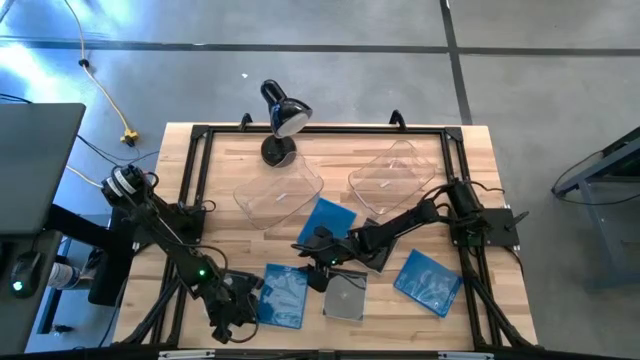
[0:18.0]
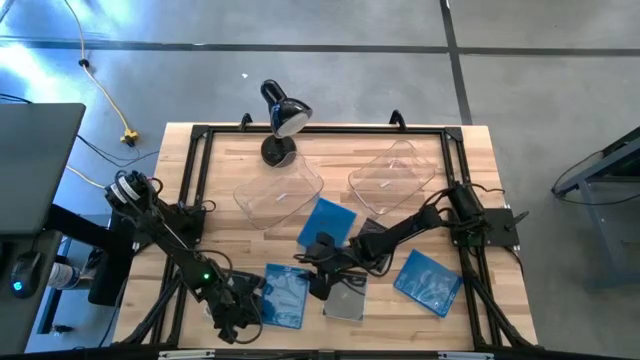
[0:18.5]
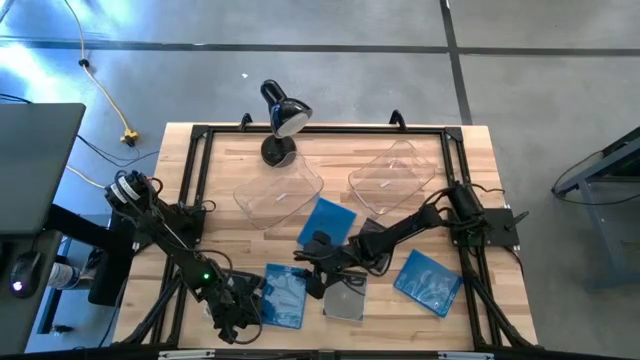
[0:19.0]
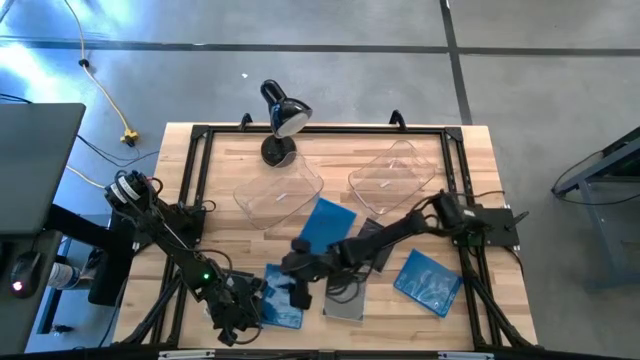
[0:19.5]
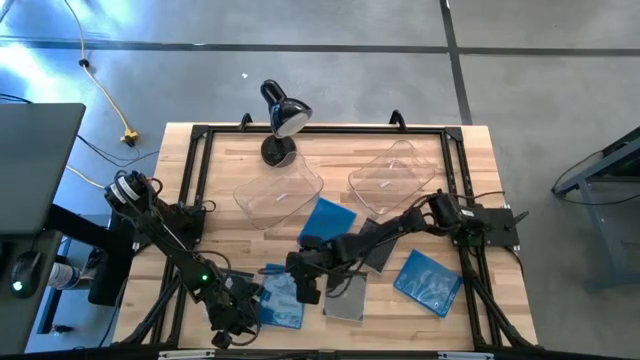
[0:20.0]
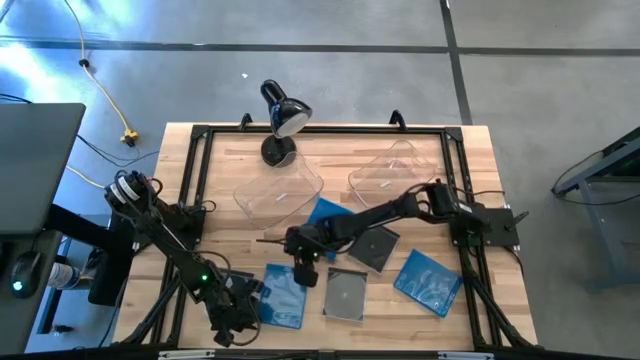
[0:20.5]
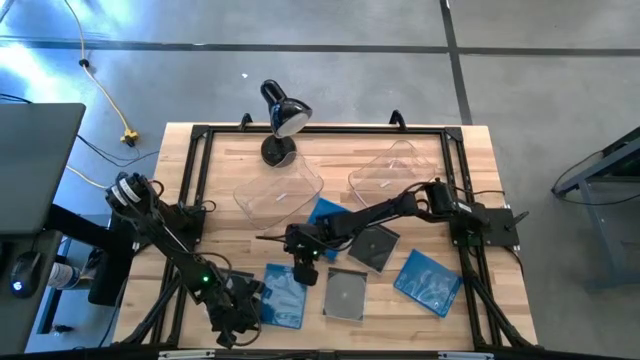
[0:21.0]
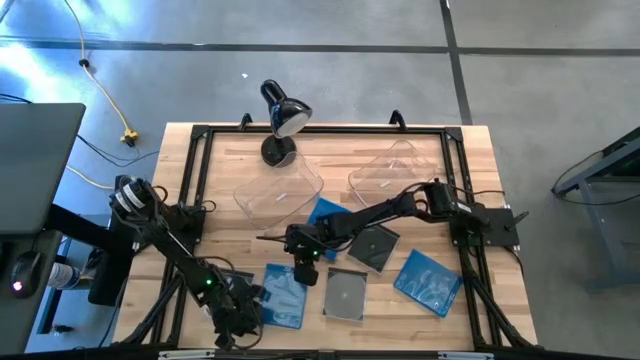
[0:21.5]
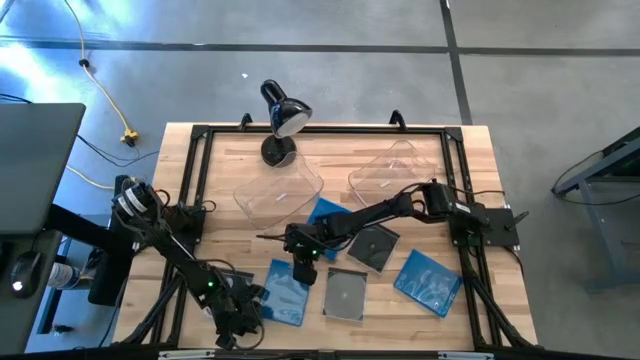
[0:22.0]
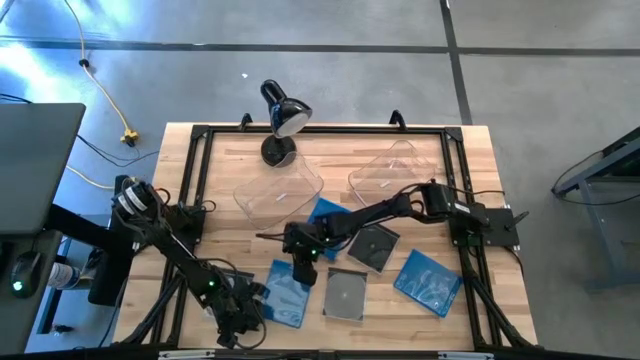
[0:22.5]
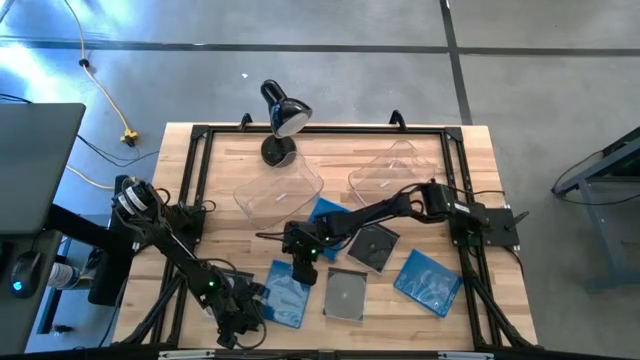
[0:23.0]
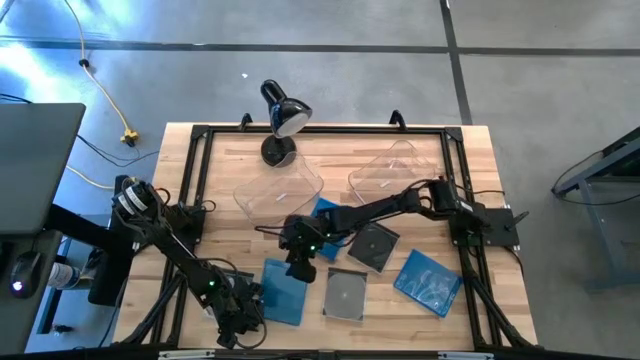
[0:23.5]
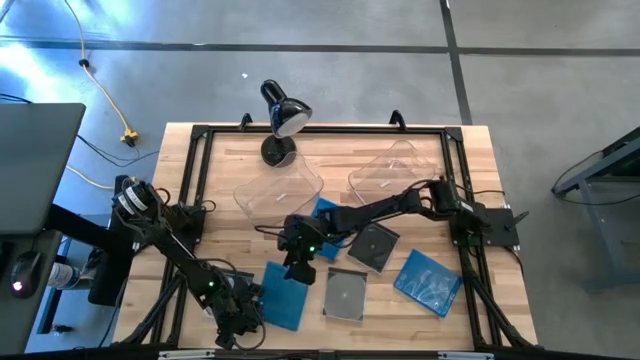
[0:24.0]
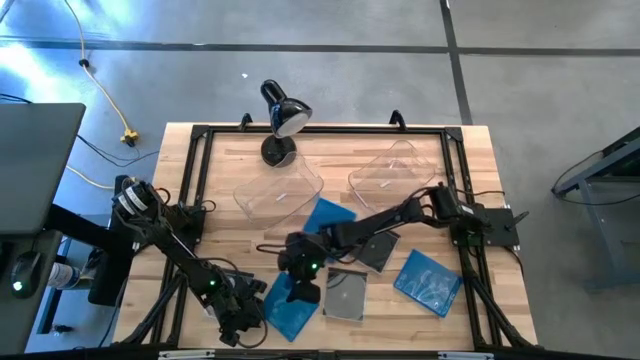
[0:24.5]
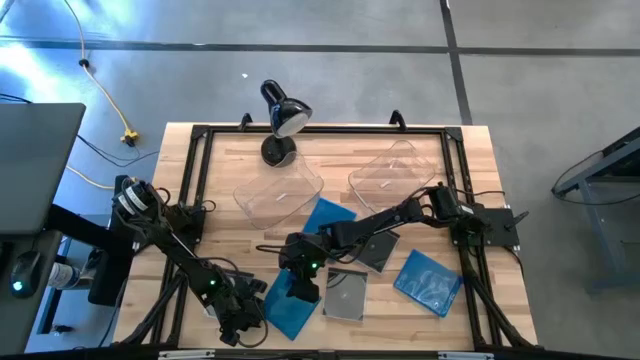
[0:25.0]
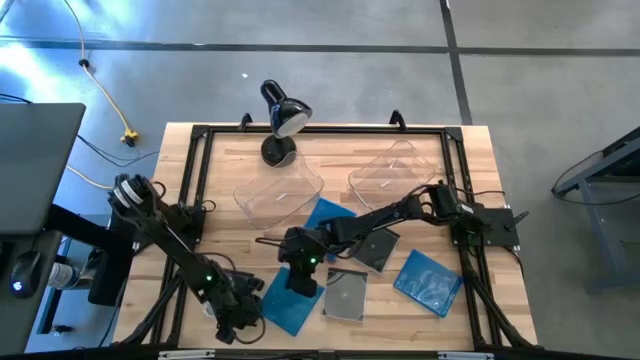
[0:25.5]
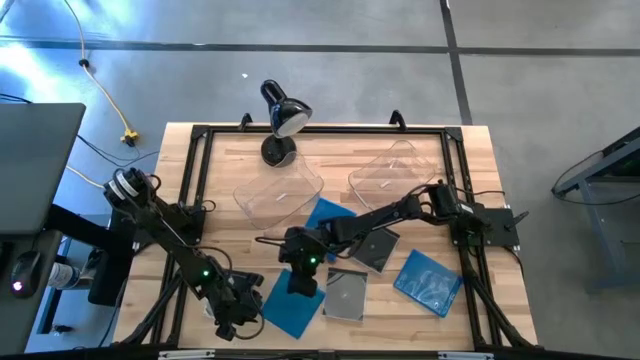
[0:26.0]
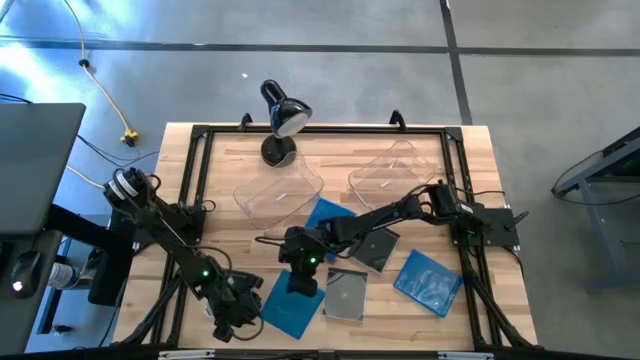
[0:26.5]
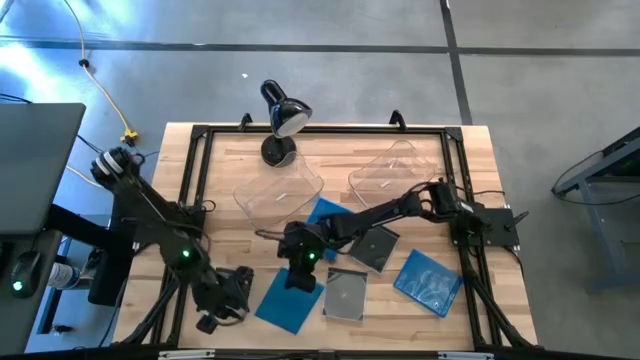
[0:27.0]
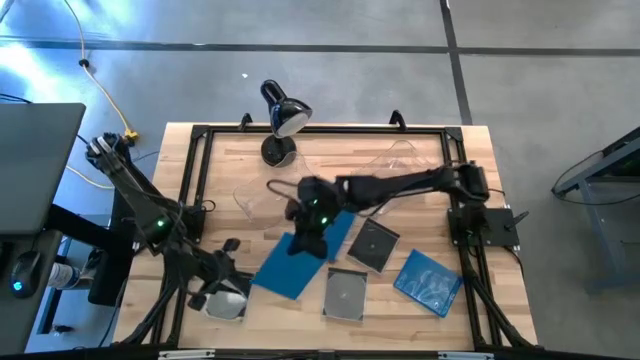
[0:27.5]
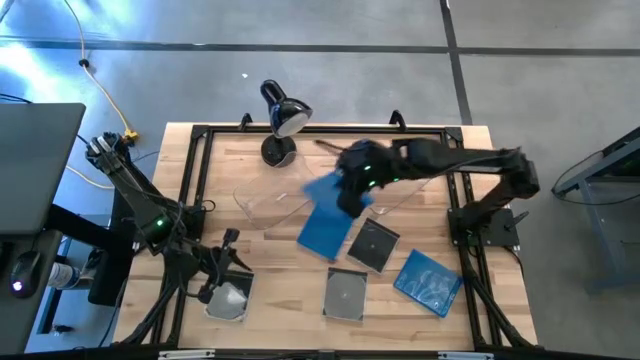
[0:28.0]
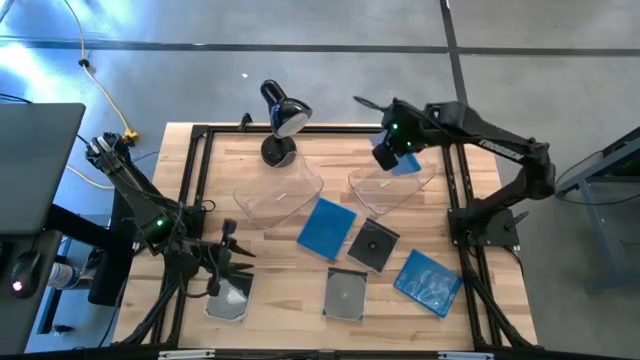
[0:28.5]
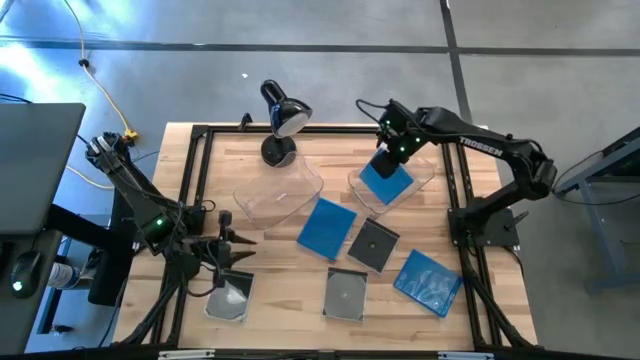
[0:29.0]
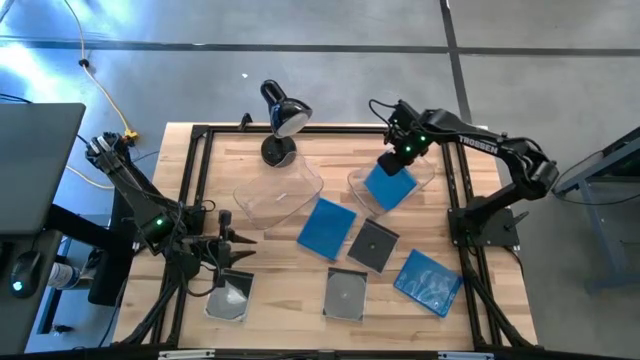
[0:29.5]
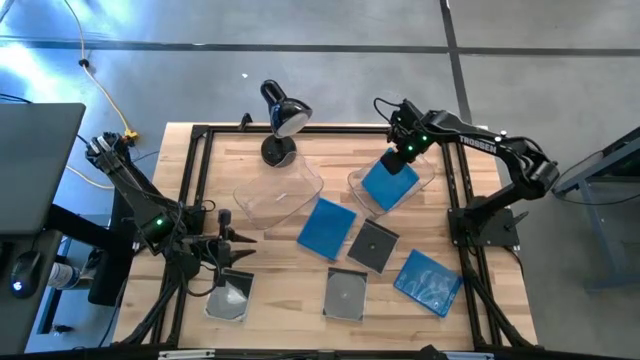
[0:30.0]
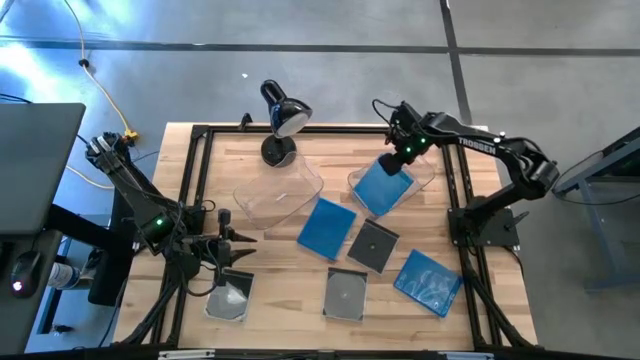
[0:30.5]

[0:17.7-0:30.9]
Task: Pick & place jewel cases by type
Put the bottom left blue CD case into the right transparent bin

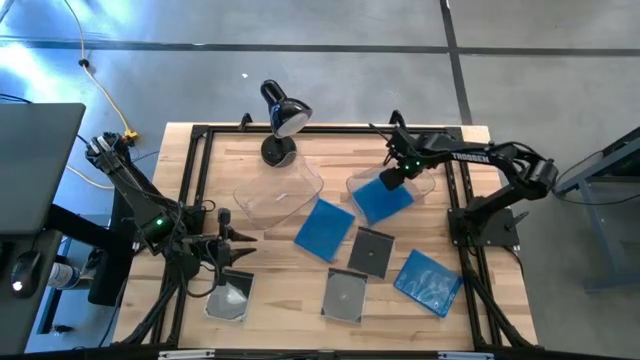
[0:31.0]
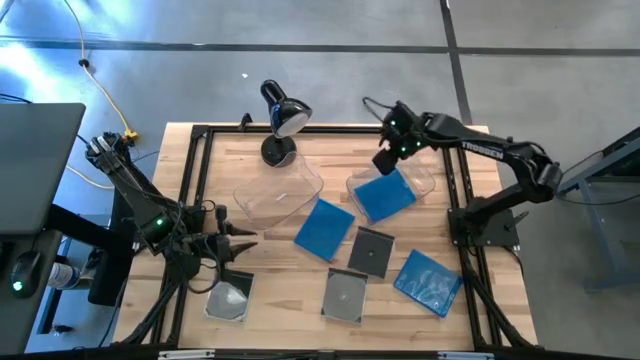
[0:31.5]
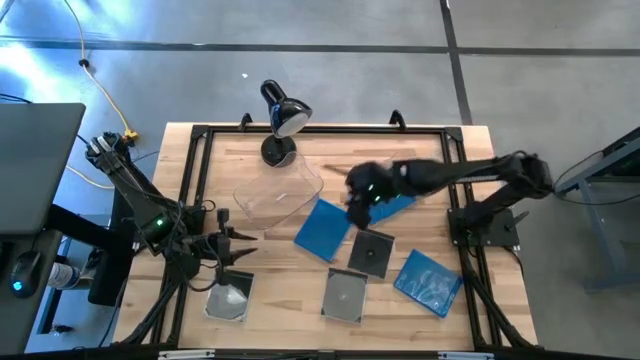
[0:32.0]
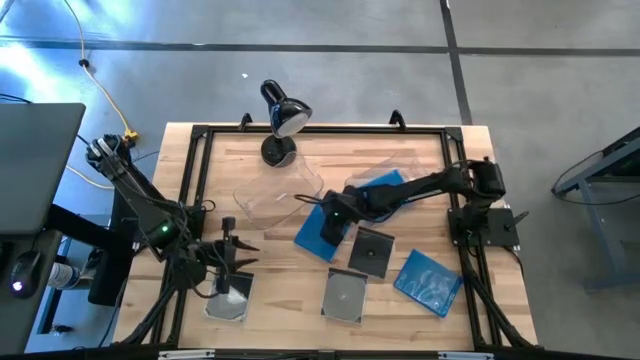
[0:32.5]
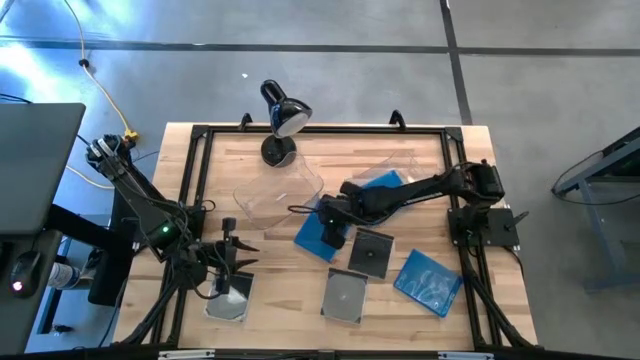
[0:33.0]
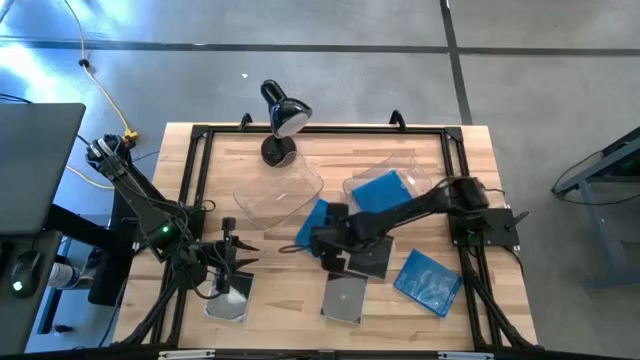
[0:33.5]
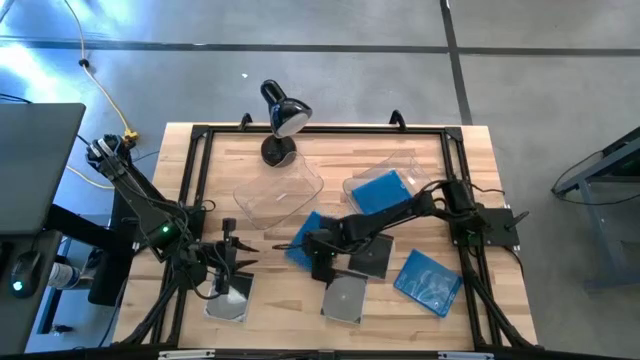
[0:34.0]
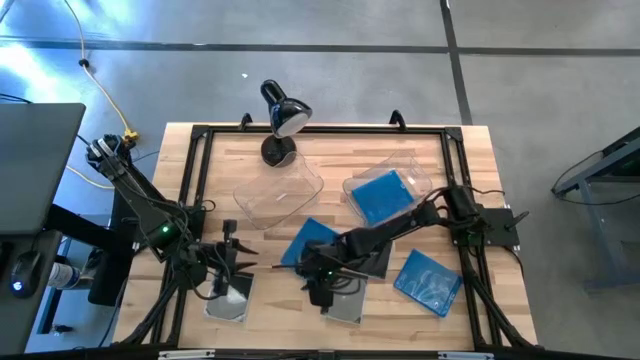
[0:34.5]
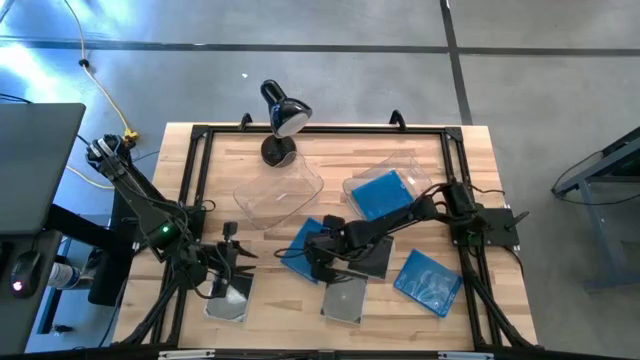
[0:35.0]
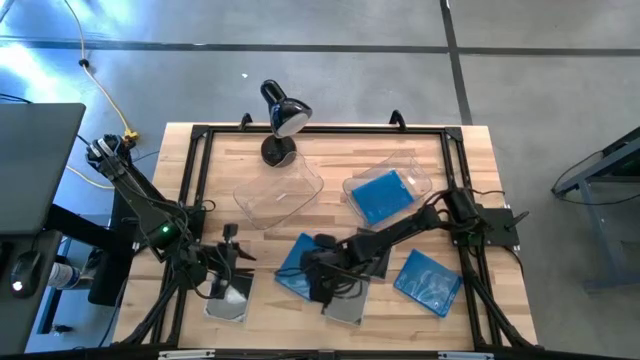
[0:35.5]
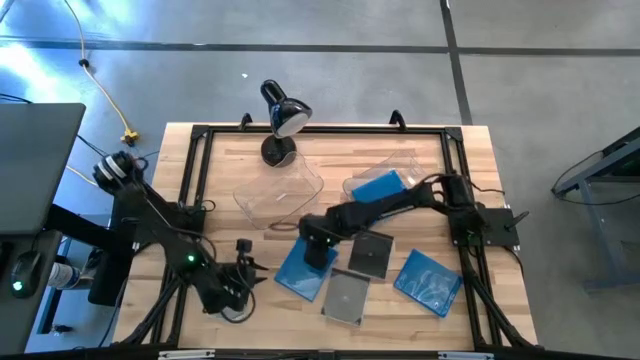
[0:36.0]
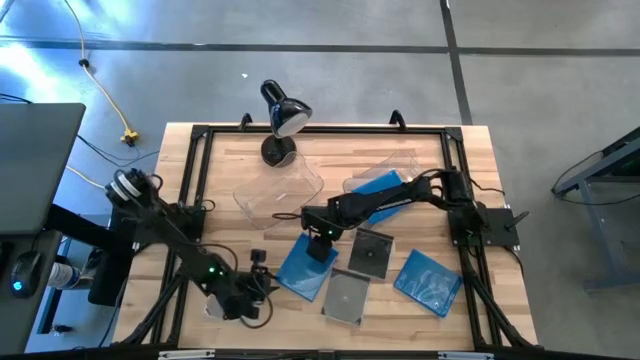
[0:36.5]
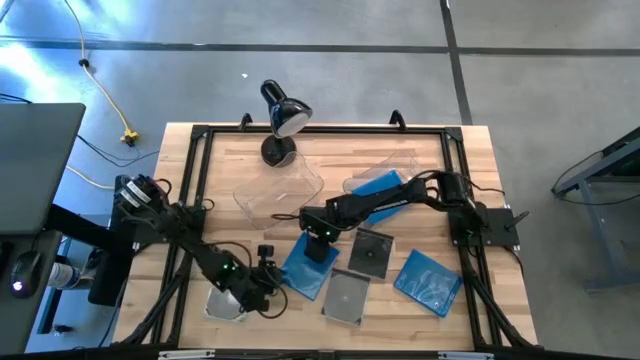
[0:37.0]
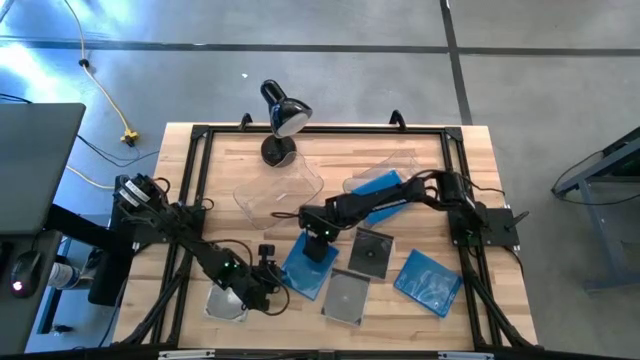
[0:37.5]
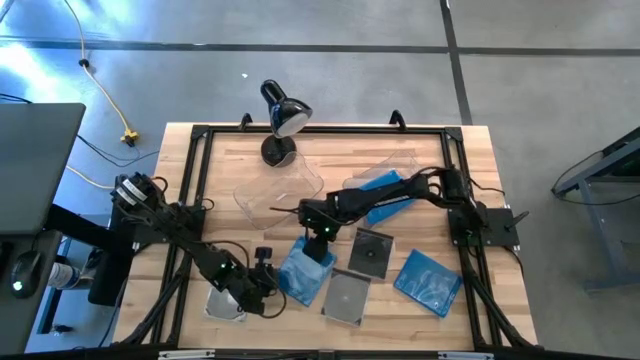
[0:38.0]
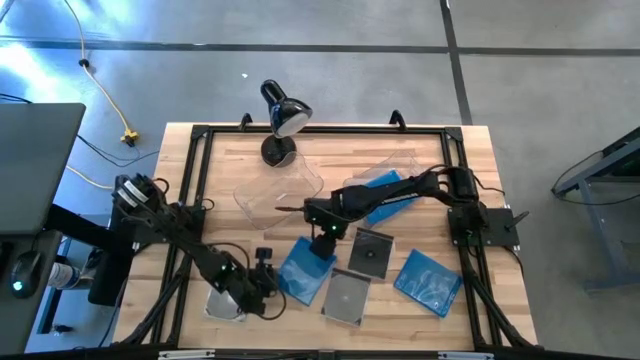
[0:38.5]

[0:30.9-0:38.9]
Put the top blue CD case into the right transparent bin

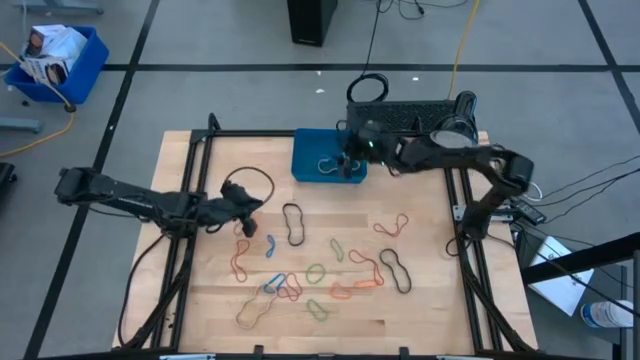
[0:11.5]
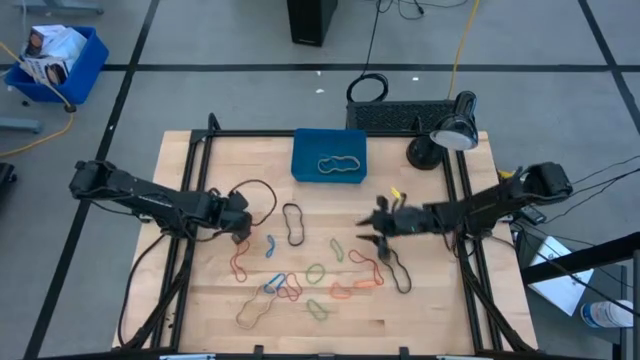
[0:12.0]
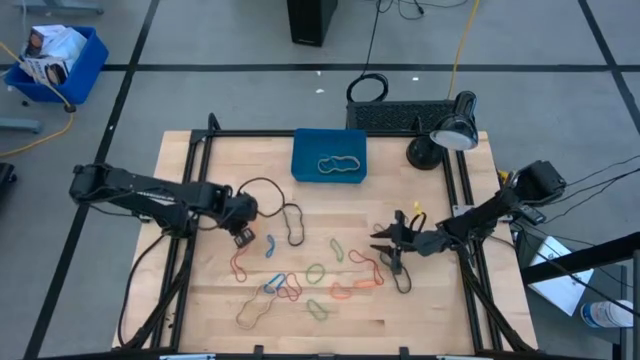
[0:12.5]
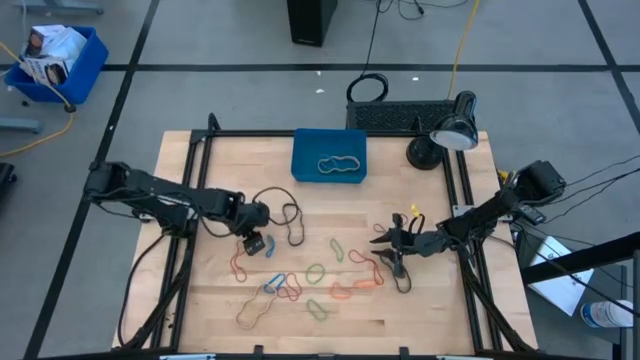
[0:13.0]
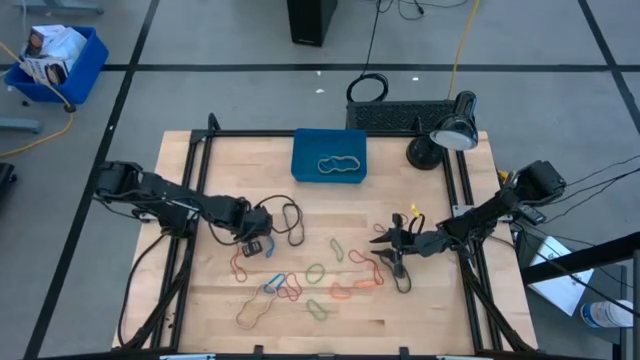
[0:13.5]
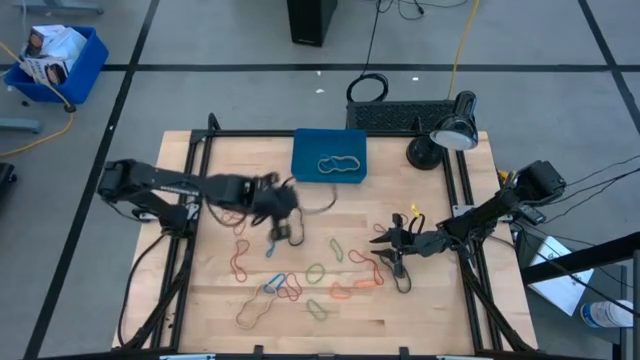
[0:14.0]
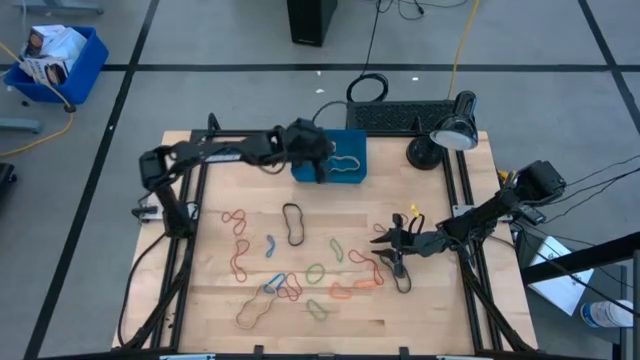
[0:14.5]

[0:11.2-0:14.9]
Task: Pick and place rubber bands into bin
Put the orange rubber band into the blue bin
